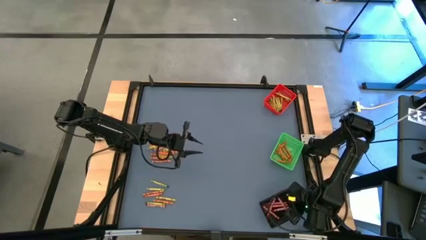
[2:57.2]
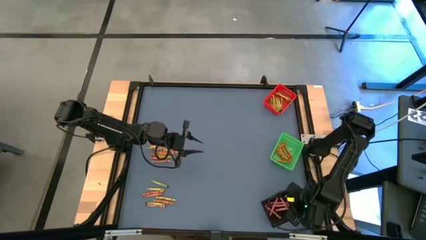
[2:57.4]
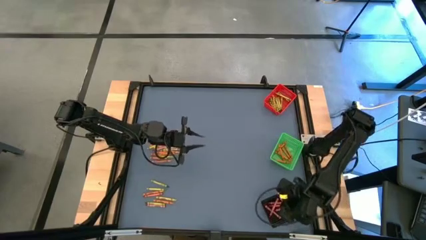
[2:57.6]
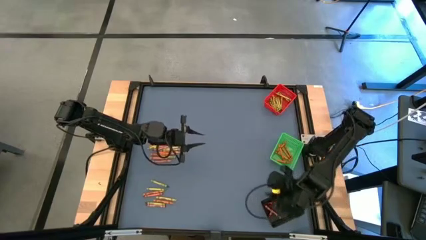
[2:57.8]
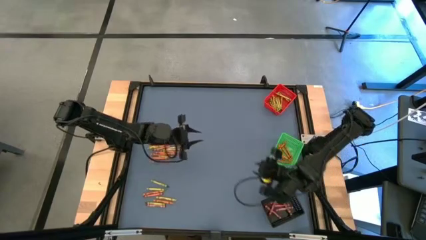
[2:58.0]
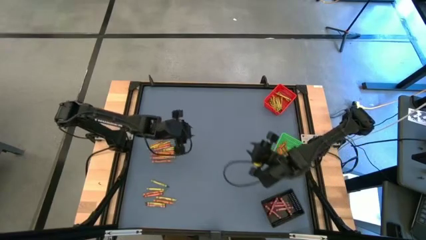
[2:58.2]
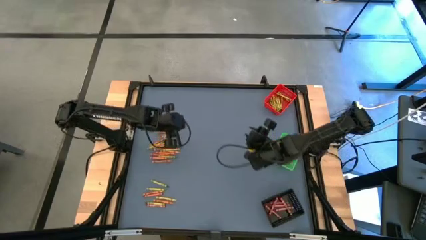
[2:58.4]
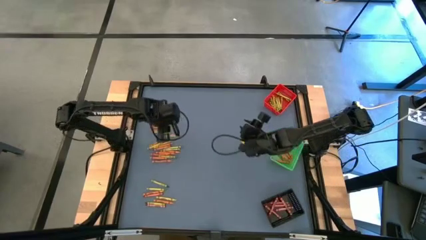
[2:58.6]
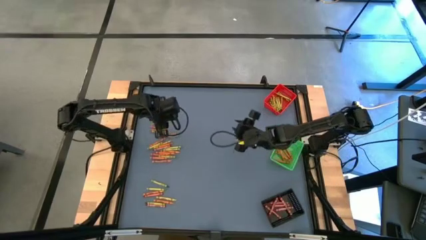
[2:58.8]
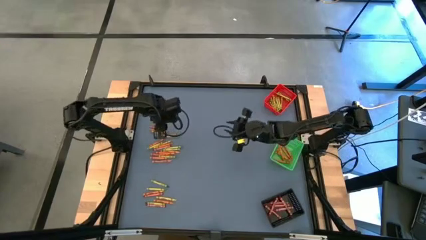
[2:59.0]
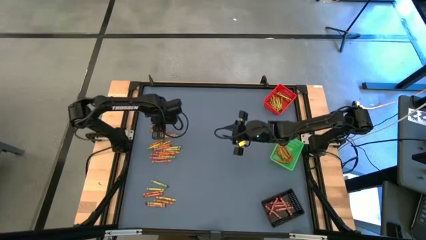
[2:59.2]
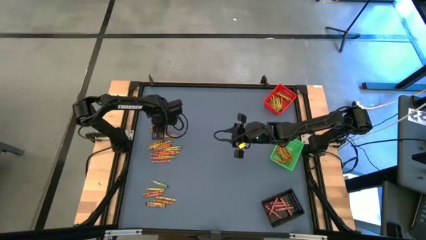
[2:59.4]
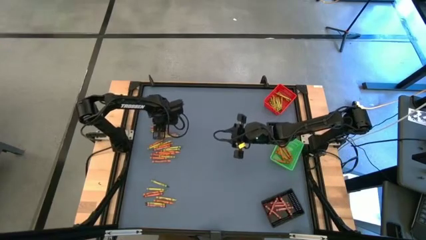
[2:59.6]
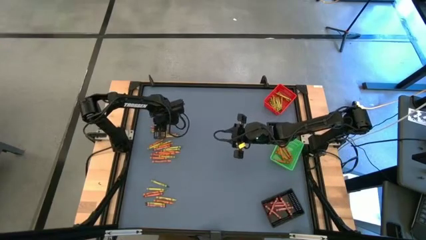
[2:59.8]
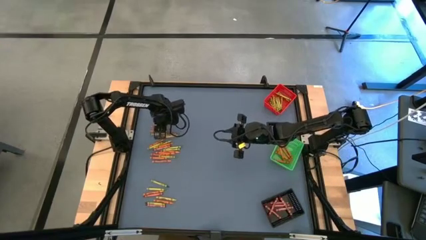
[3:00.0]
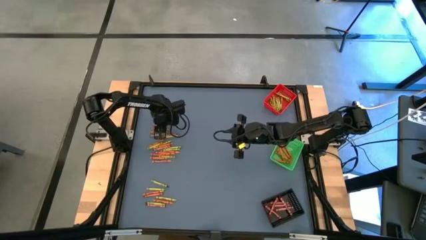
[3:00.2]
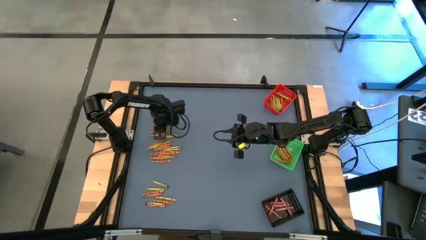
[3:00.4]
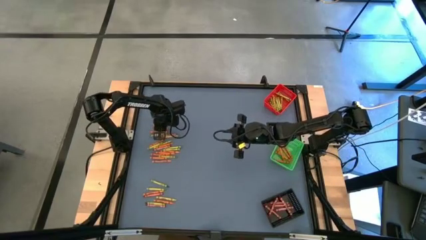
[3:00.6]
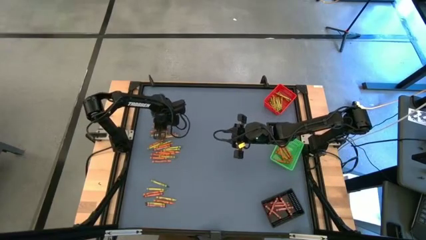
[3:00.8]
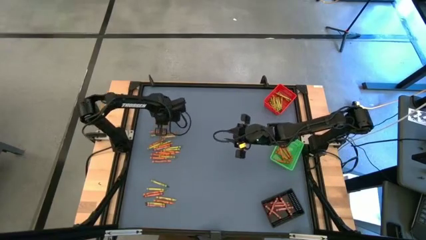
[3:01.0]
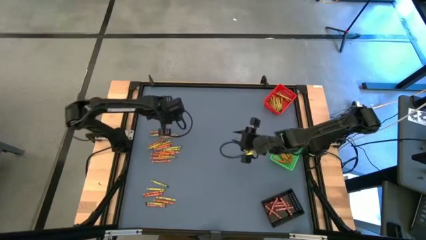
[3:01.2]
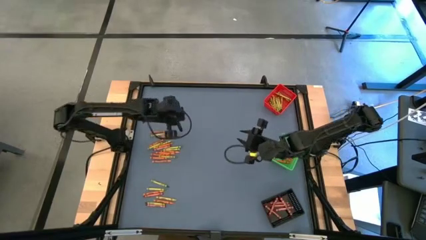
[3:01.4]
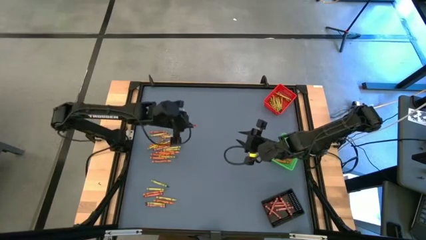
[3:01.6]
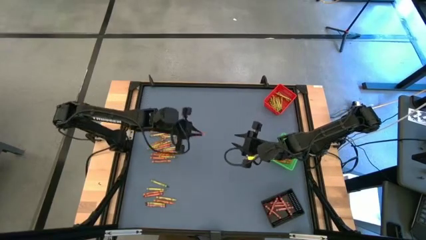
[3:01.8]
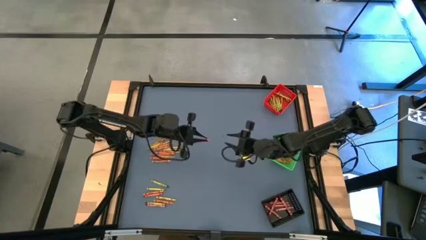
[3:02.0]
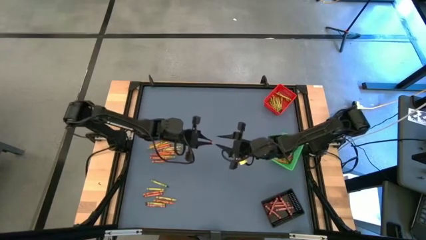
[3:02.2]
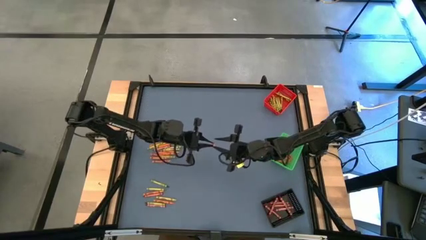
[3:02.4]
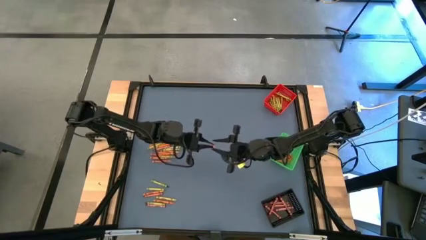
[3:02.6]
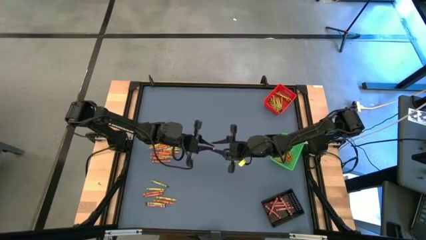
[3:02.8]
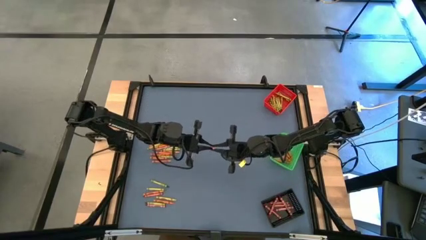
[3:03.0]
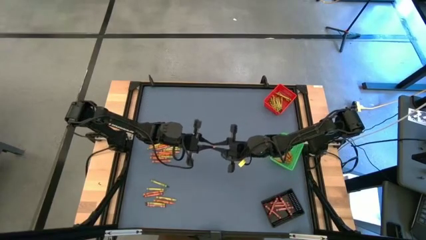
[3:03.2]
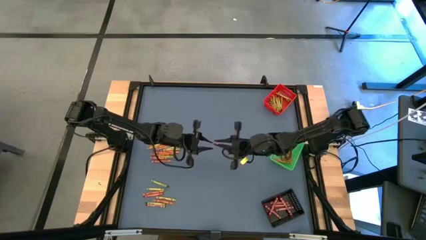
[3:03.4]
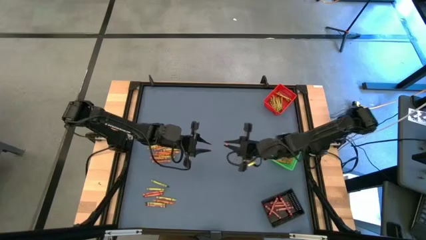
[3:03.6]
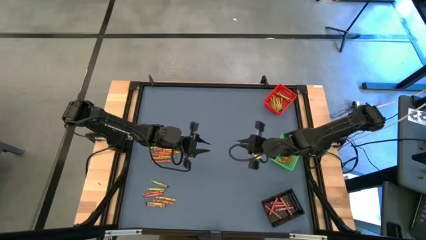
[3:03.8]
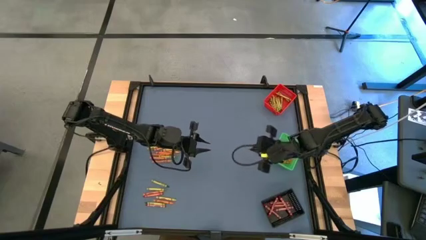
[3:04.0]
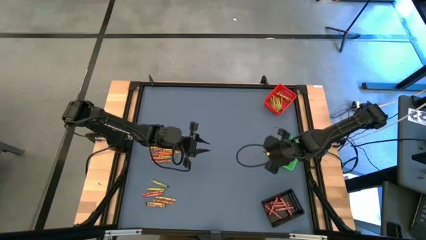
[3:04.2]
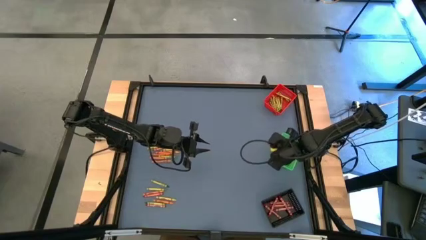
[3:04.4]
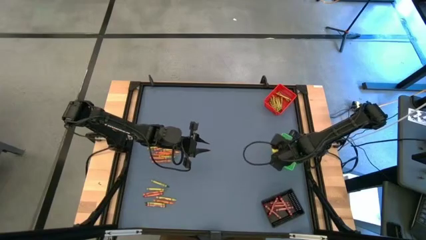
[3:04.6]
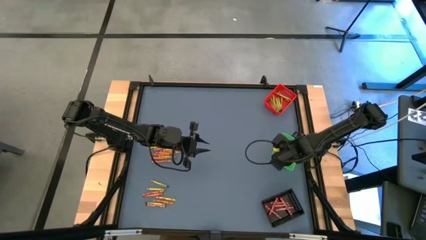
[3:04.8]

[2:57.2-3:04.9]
Task: Sort crayons
Put the orange crayon into the green bin

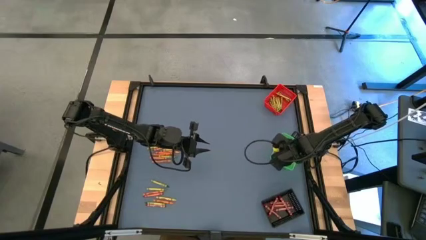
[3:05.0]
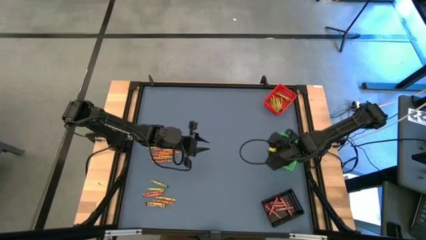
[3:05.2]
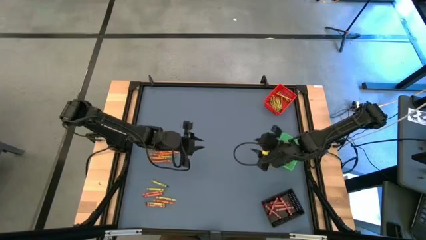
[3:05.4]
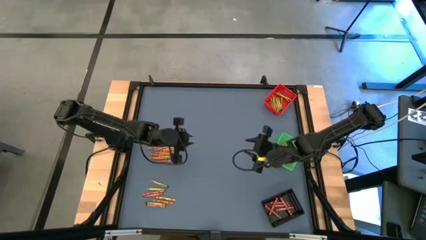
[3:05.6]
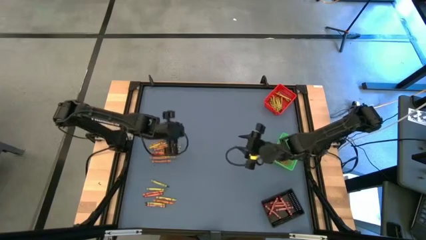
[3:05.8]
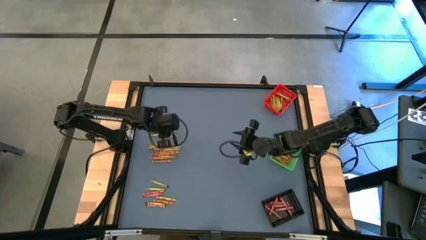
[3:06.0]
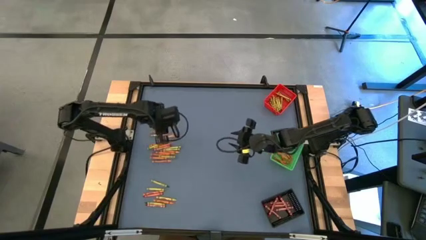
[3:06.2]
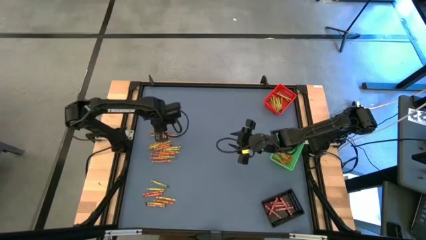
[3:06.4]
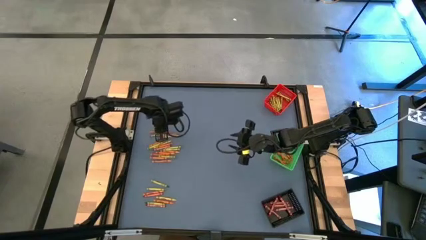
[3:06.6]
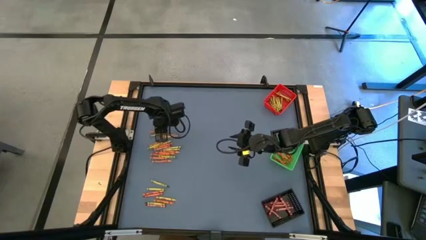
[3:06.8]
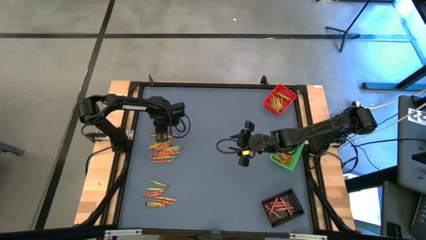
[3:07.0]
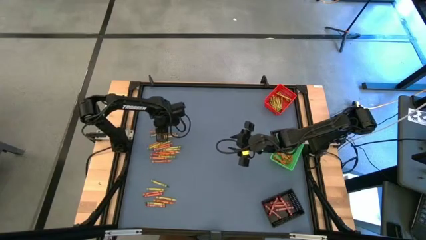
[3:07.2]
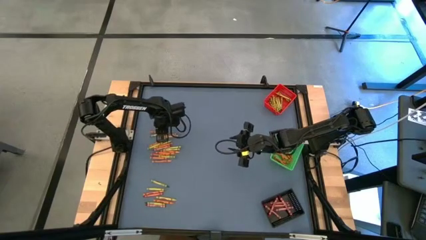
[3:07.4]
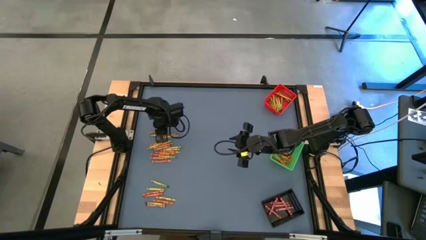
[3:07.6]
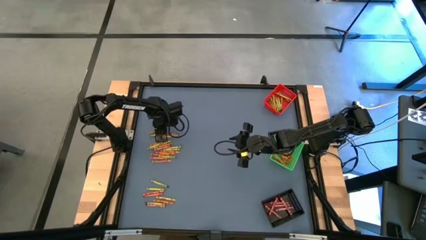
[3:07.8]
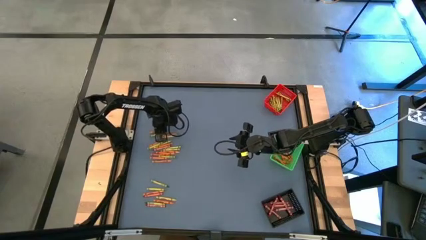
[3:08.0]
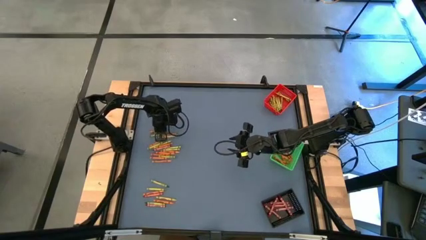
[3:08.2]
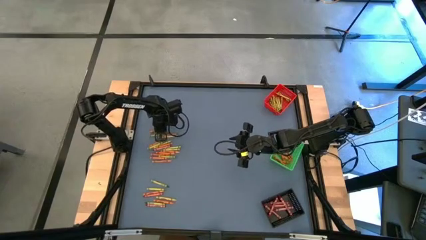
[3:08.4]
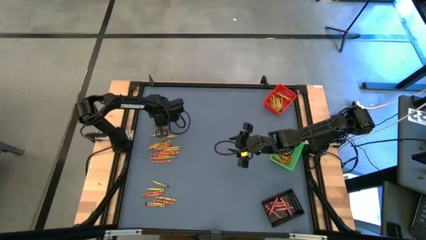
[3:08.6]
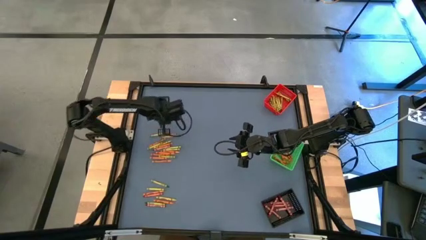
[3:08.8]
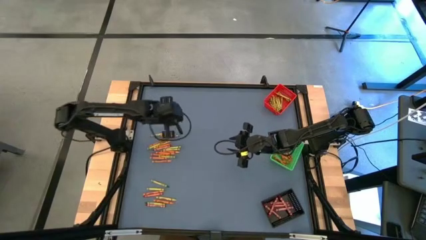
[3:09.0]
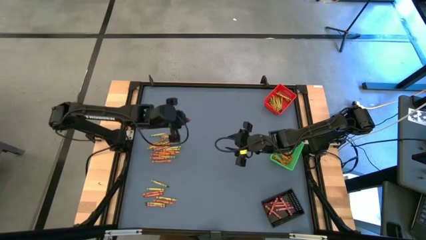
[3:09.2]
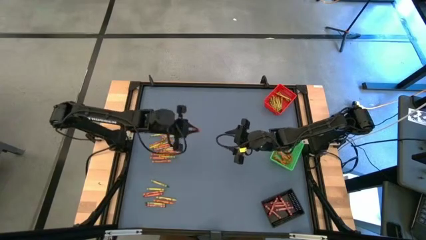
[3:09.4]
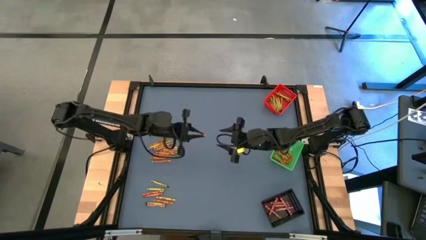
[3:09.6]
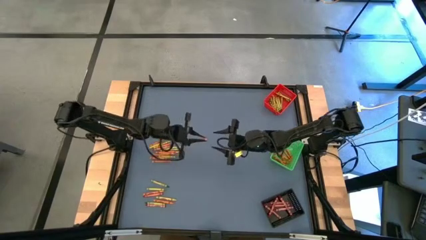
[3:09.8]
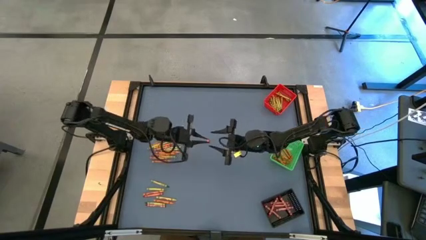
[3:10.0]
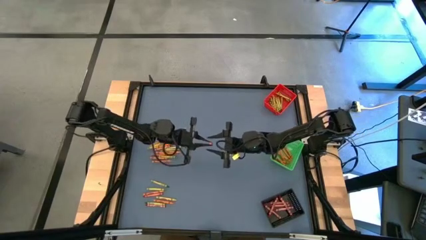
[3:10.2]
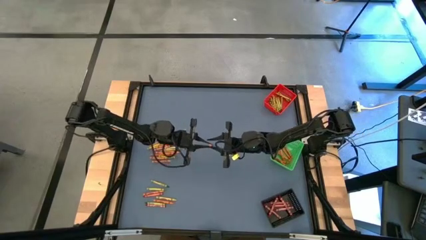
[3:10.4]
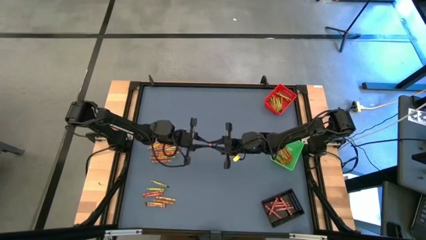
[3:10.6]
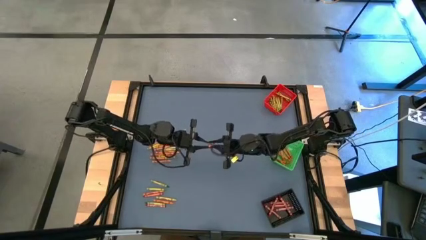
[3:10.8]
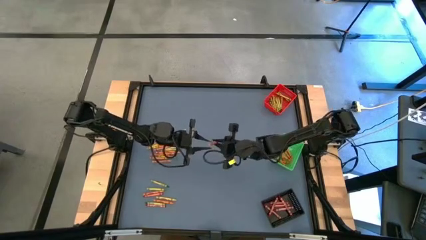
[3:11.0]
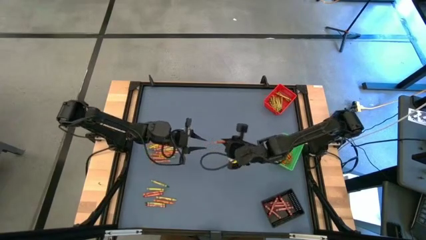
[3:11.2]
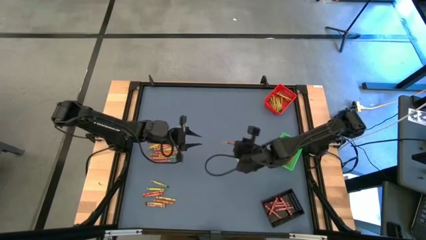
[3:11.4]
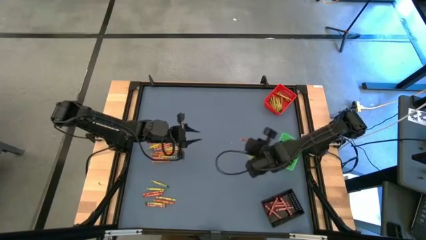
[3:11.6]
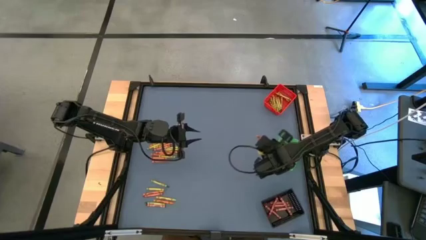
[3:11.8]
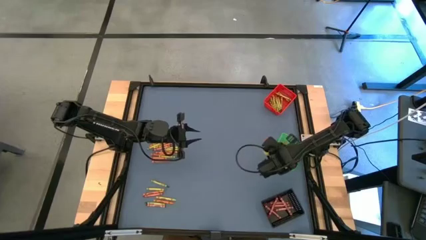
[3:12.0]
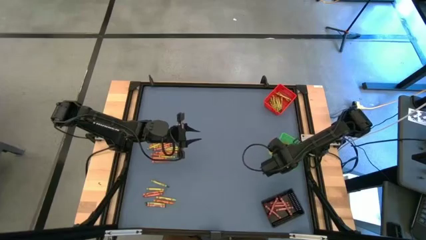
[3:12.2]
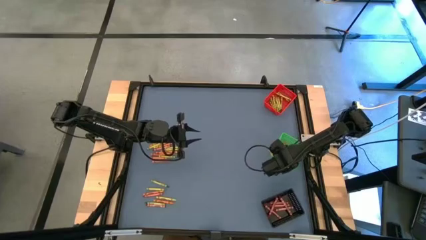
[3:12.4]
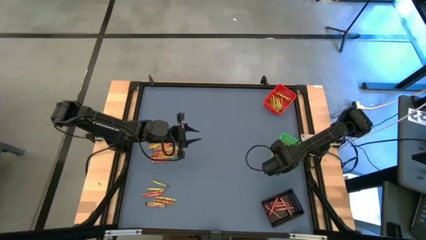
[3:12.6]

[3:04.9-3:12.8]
Put the orange crayon into the green bin
